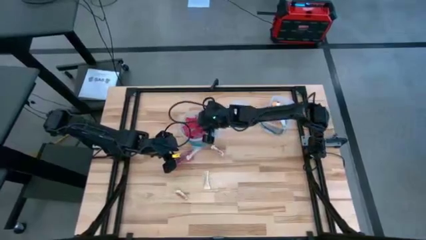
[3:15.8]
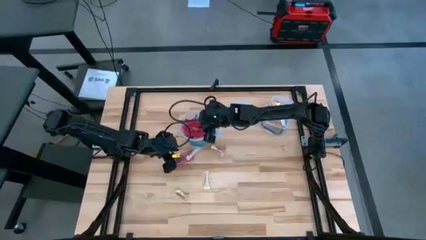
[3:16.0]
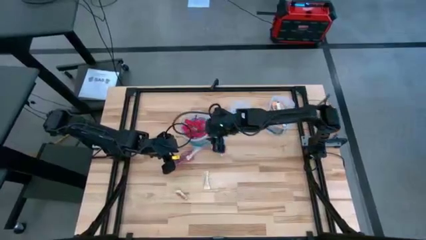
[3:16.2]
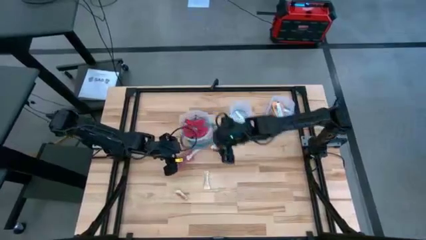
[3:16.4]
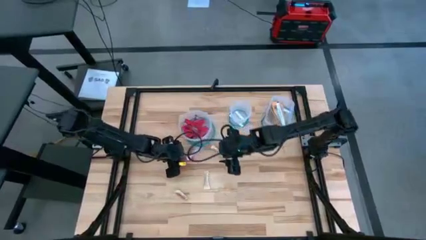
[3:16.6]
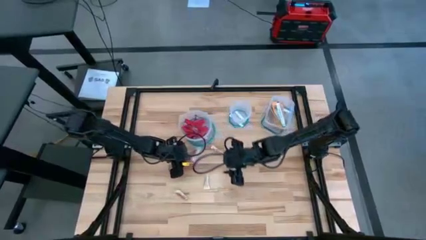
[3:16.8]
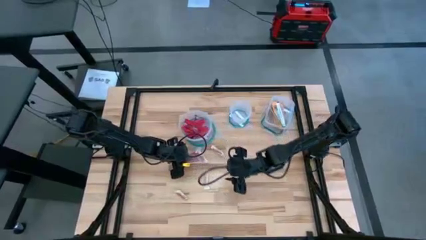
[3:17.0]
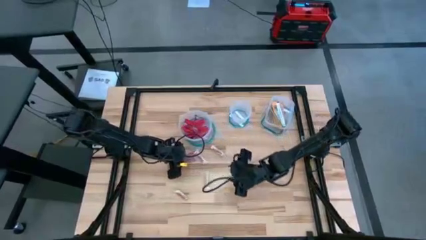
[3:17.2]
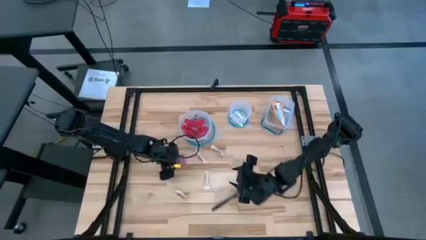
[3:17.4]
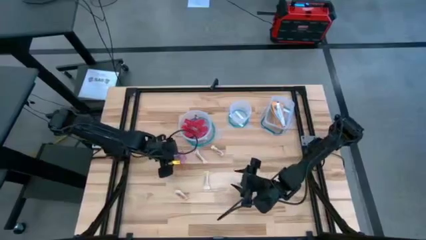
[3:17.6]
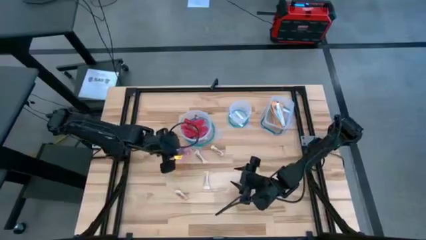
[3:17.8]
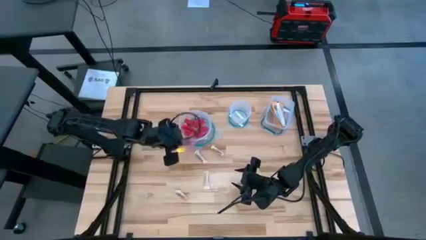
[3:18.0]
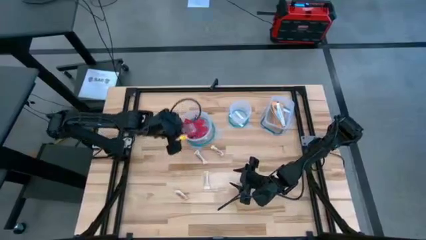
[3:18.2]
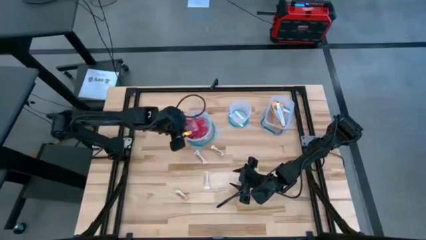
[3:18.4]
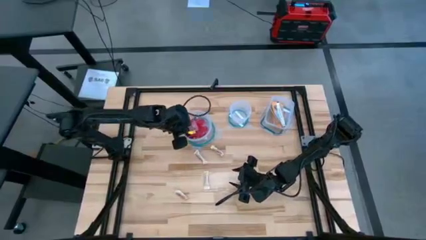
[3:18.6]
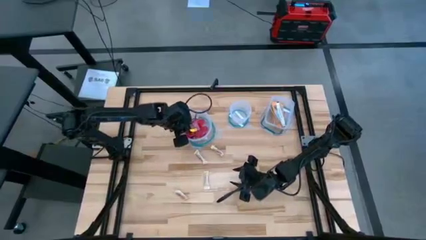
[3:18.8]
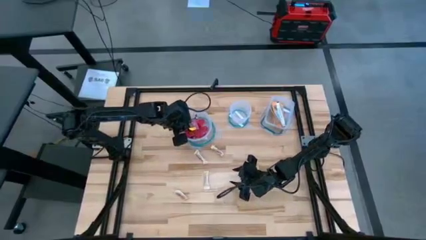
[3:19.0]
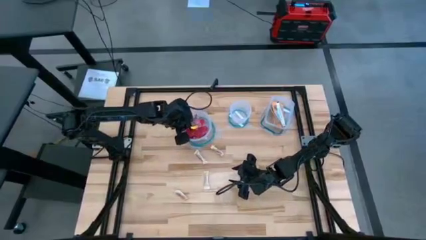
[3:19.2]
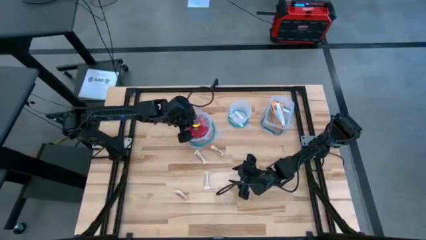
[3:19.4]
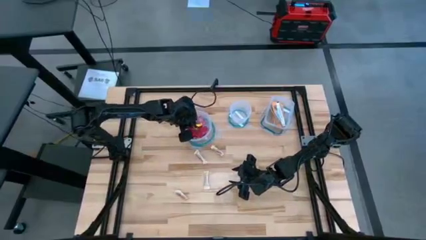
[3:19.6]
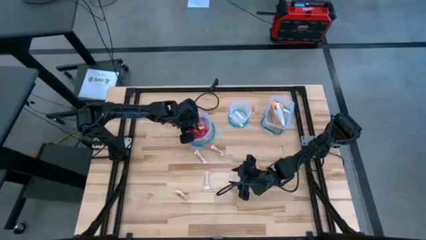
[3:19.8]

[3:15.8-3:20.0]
Task: Sort candy
Put the red candy into the big round transparent bin

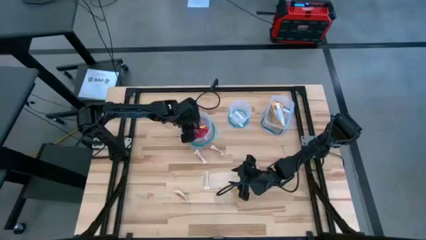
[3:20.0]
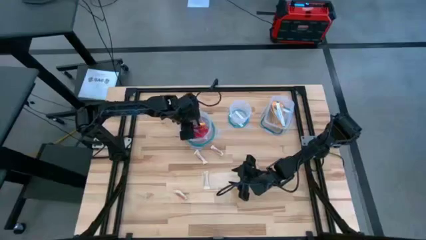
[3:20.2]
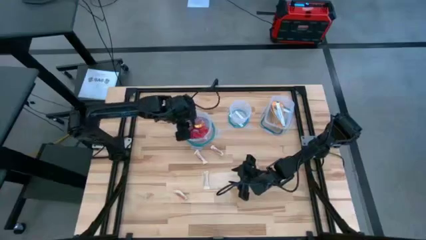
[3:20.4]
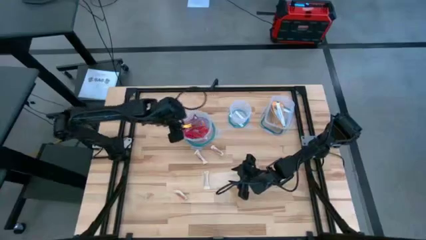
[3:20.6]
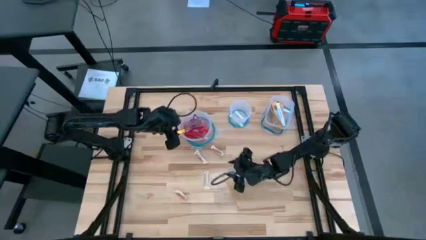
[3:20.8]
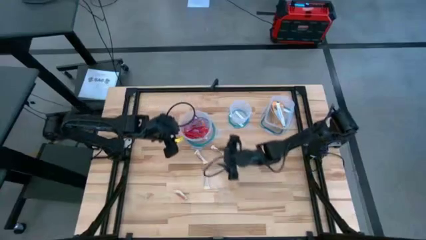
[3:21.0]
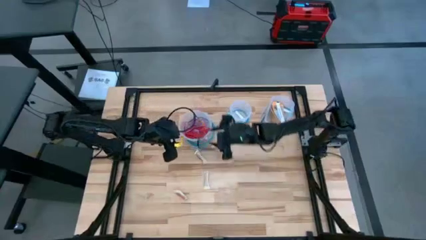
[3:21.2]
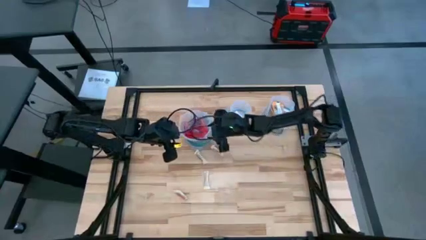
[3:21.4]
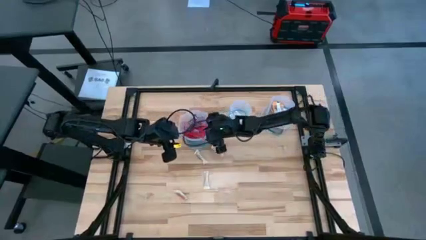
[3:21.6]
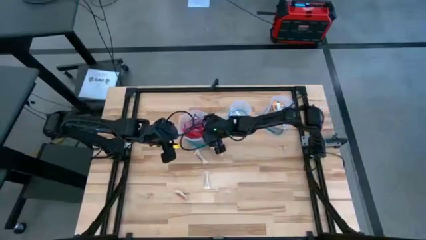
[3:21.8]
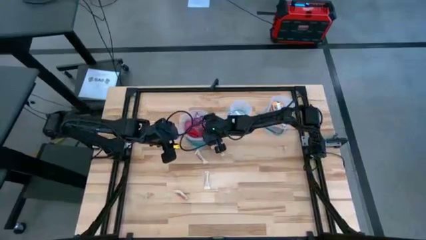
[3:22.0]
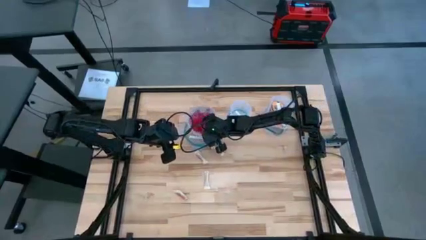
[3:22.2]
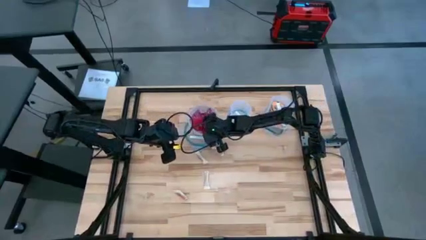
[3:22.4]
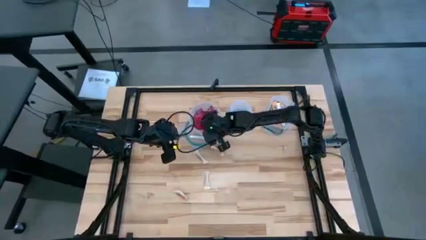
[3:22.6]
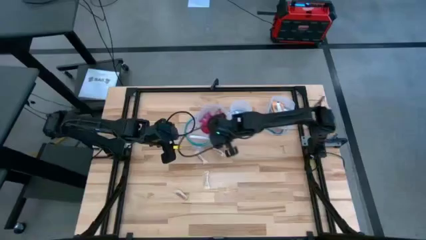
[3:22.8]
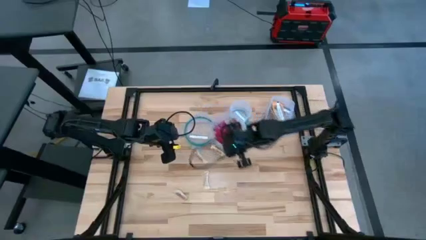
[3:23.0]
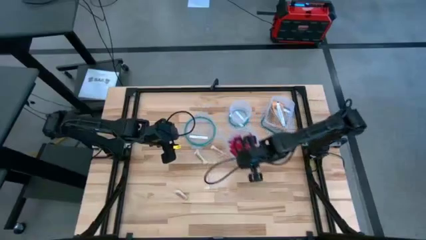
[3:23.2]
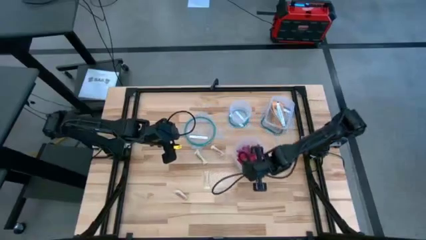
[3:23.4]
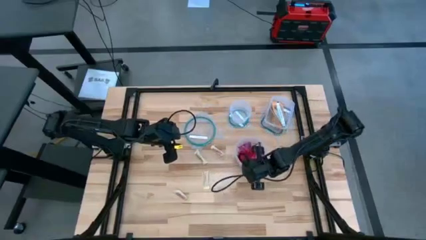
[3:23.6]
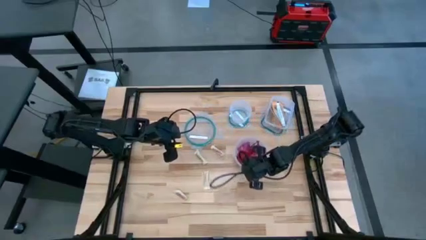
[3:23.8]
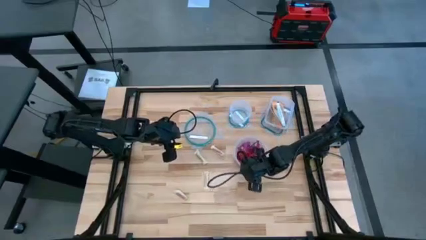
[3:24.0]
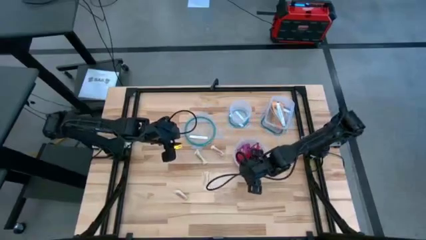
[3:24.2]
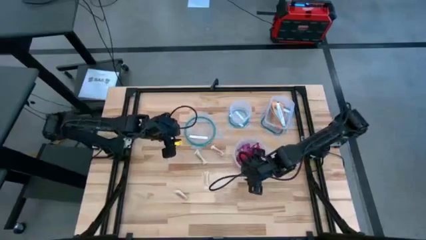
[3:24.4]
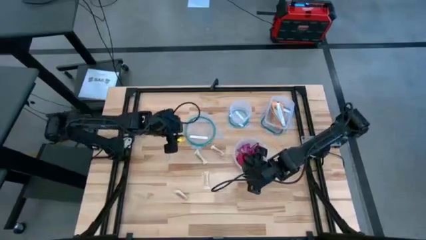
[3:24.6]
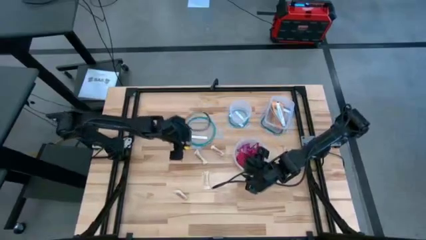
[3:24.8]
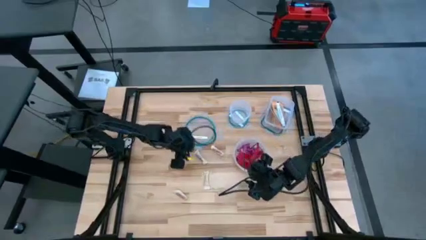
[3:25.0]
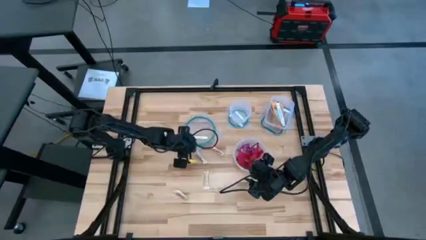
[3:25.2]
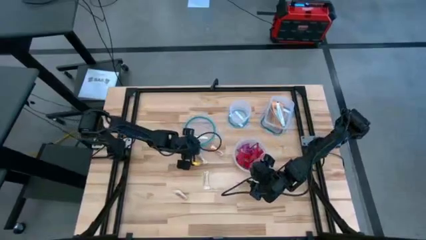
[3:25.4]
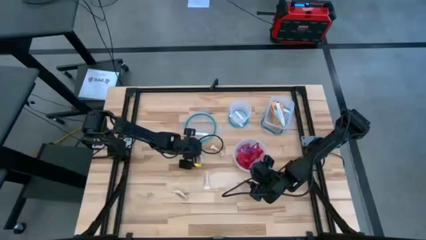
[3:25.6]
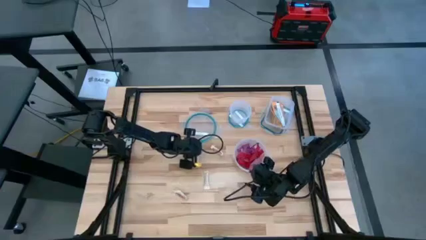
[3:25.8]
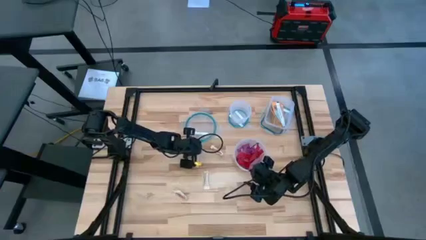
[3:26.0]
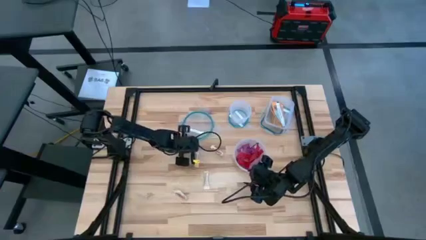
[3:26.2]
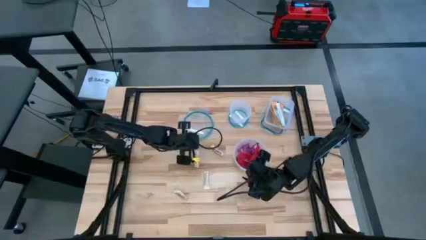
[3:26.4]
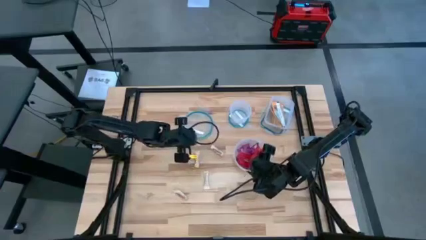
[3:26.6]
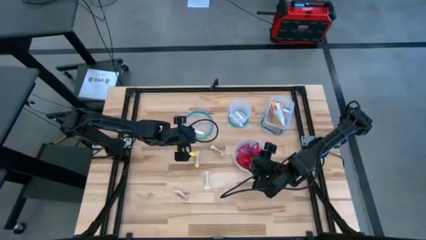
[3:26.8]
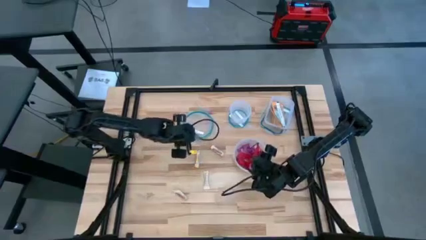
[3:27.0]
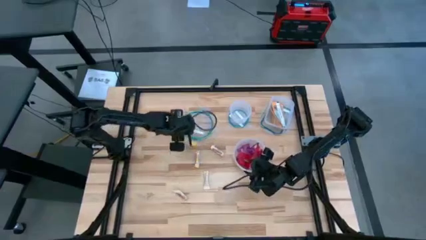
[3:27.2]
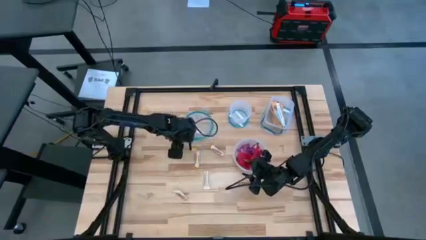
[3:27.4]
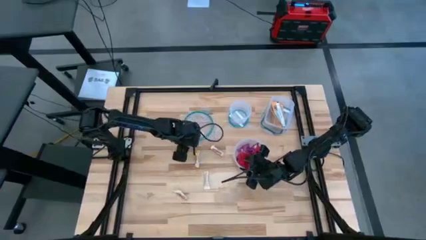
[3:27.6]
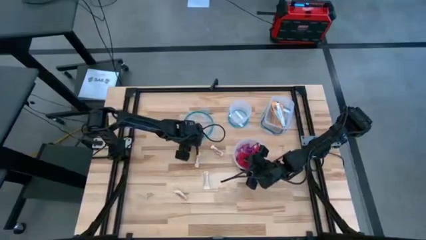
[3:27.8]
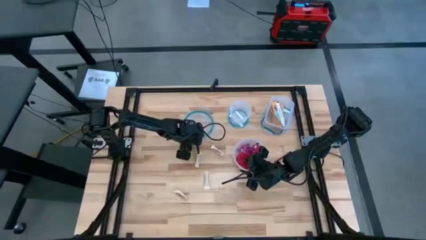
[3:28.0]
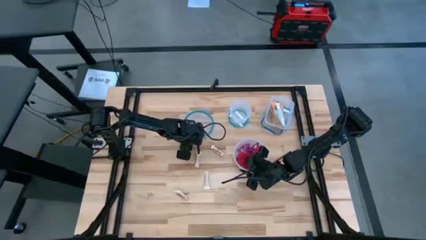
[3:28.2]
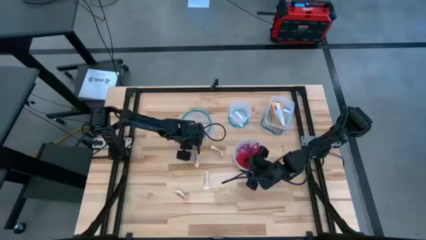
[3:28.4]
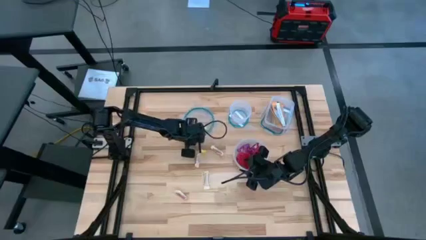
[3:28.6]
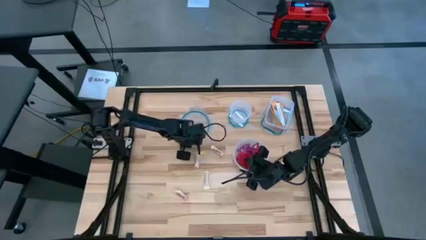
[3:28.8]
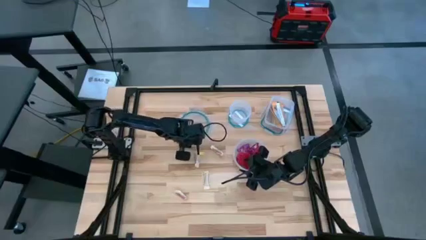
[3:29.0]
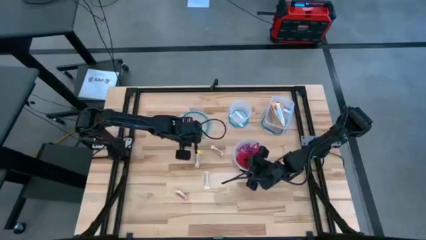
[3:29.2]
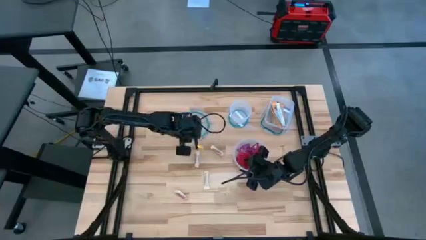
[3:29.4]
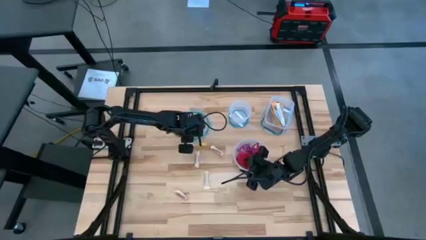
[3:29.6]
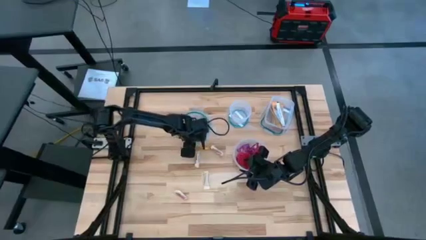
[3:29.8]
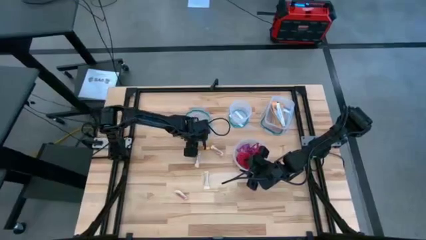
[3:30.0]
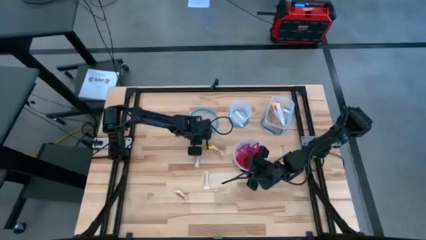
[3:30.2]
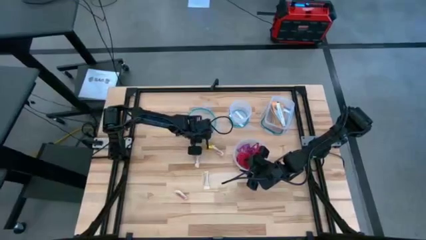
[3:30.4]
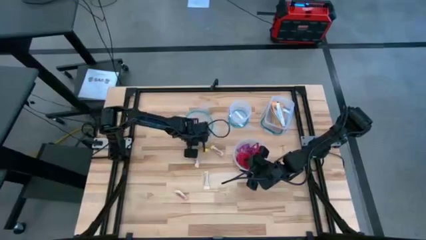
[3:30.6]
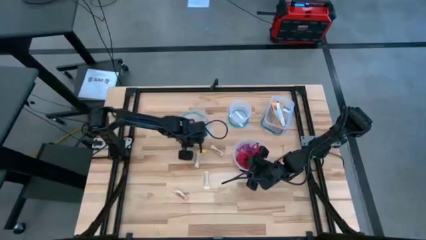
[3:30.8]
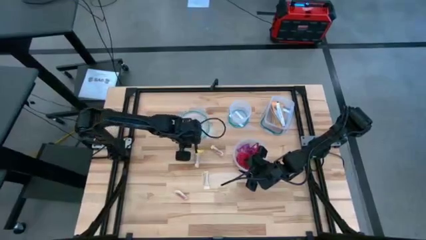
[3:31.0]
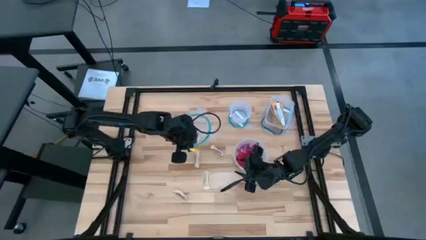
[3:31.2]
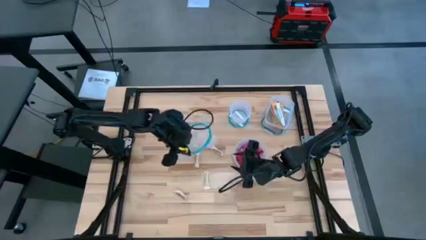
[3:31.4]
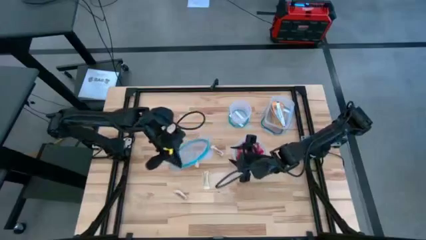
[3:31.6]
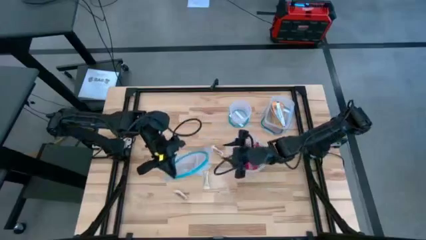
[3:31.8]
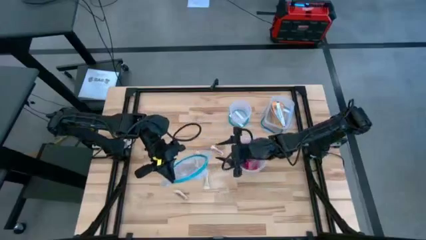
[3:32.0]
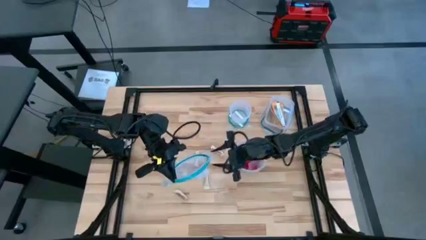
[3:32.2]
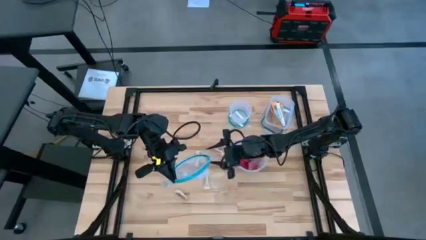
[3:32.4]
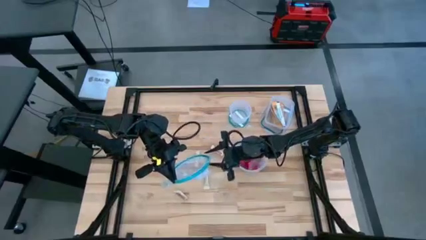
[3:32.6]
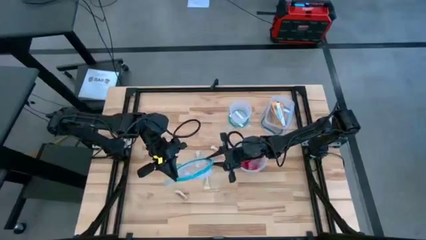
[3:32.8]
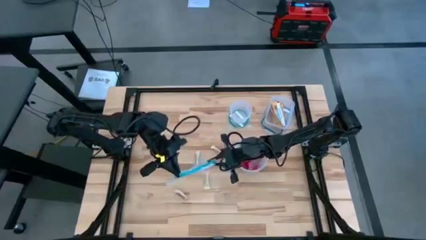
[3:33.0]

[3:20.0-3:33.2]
Close the big round transparent bin
